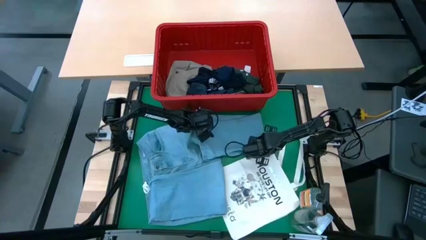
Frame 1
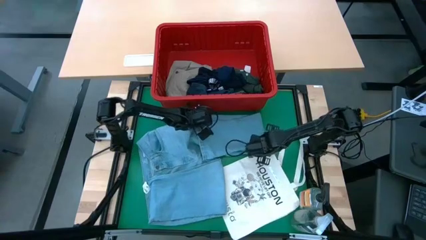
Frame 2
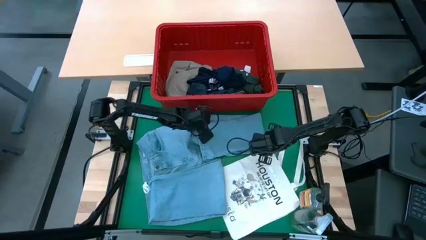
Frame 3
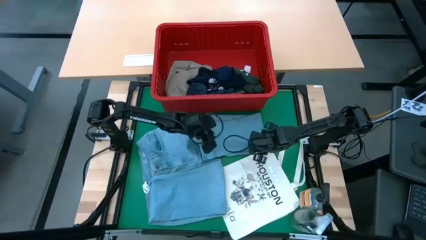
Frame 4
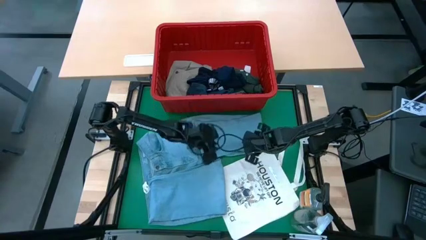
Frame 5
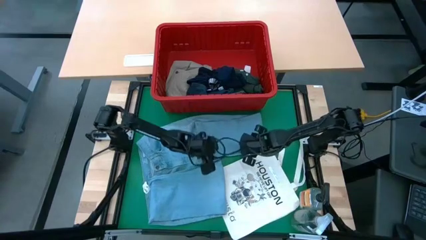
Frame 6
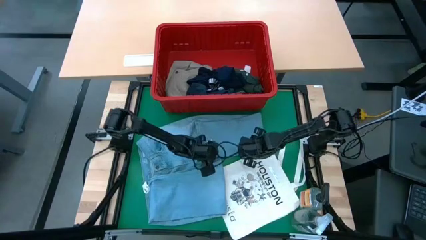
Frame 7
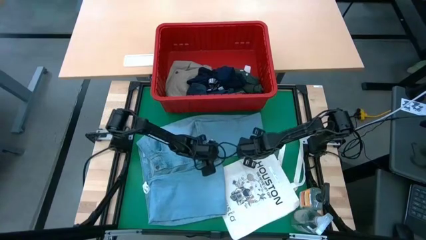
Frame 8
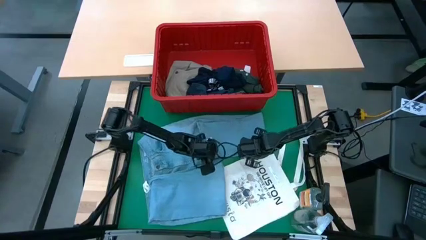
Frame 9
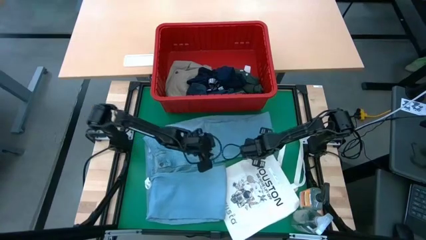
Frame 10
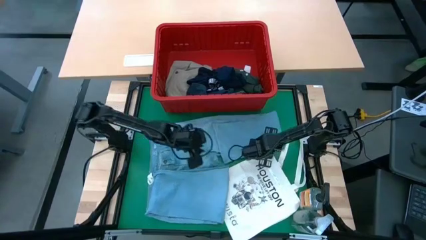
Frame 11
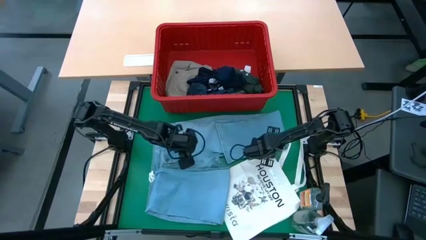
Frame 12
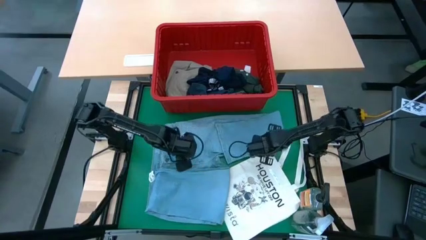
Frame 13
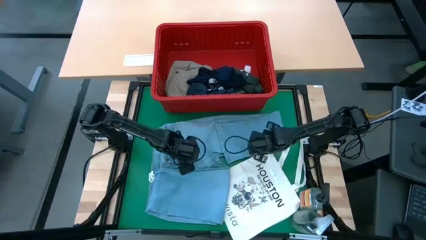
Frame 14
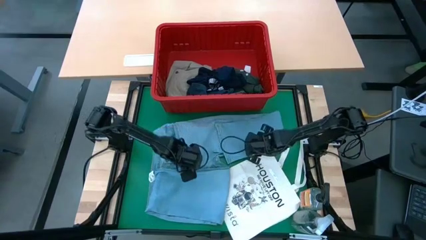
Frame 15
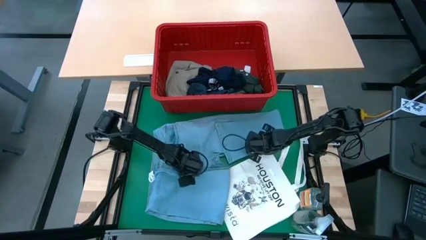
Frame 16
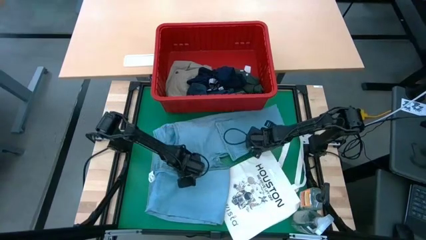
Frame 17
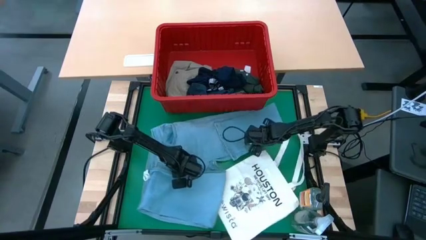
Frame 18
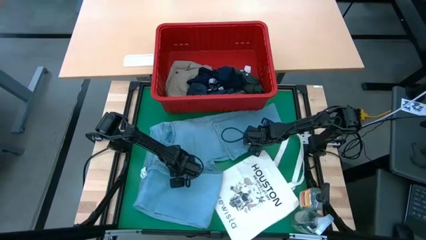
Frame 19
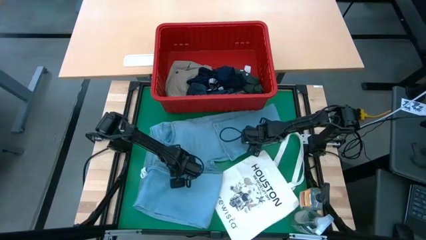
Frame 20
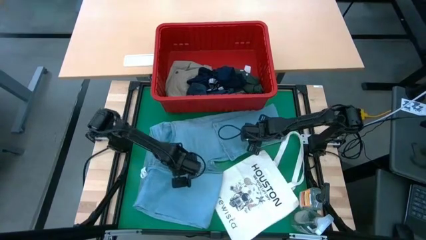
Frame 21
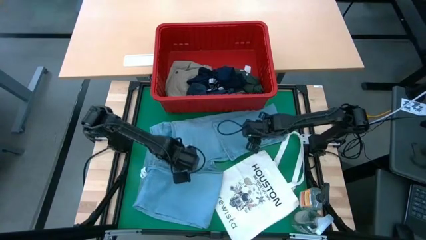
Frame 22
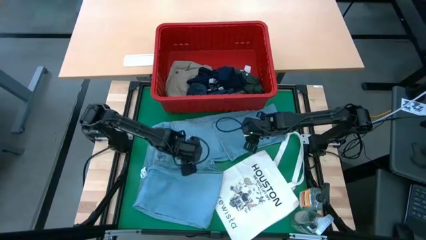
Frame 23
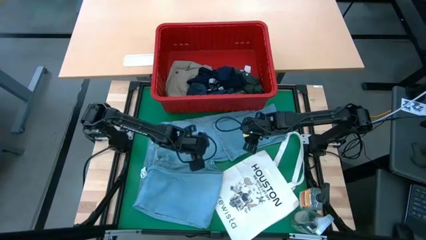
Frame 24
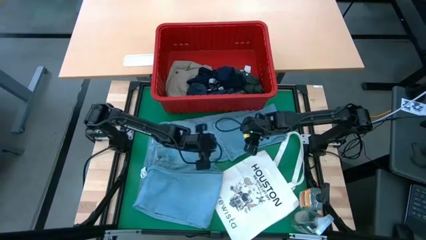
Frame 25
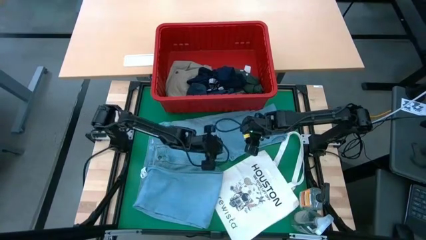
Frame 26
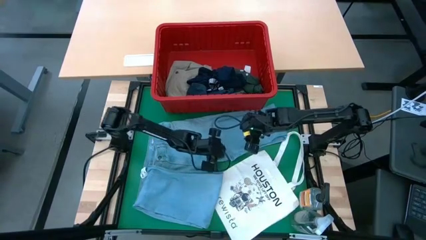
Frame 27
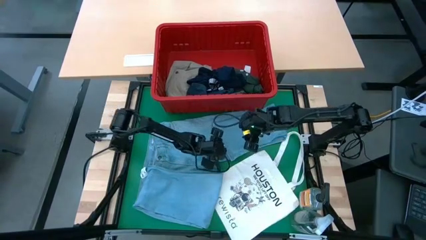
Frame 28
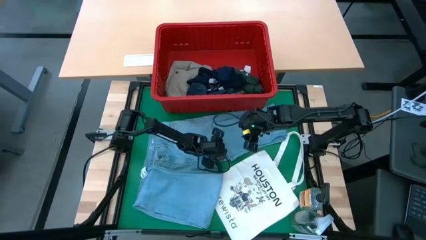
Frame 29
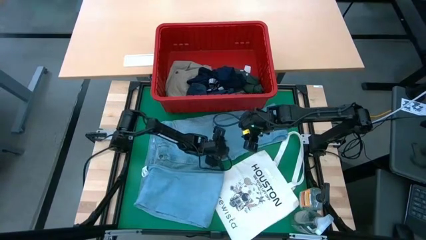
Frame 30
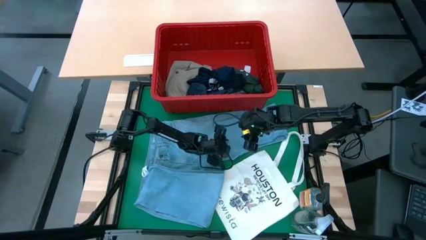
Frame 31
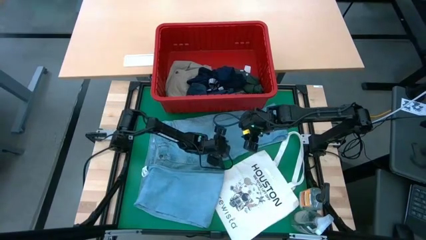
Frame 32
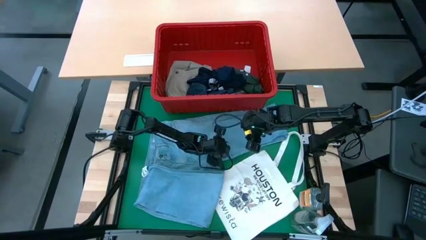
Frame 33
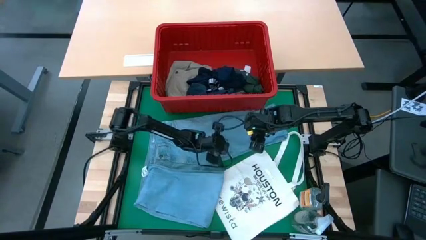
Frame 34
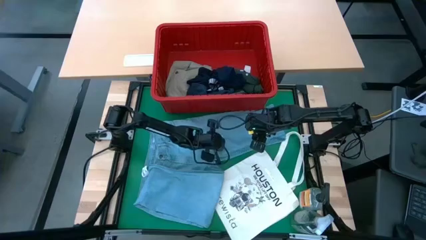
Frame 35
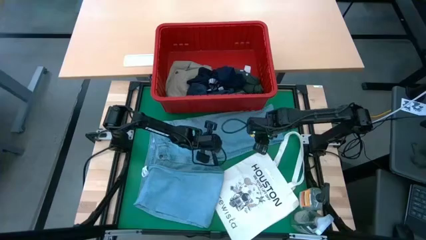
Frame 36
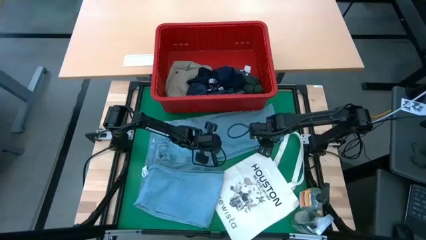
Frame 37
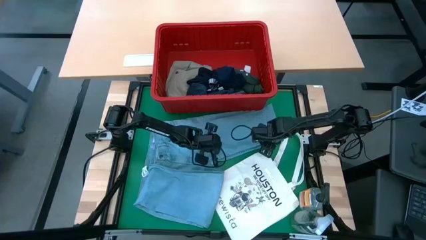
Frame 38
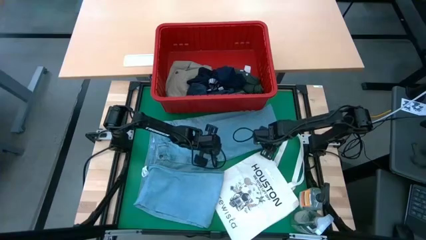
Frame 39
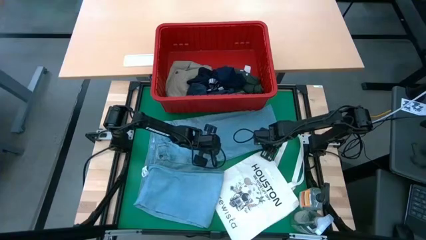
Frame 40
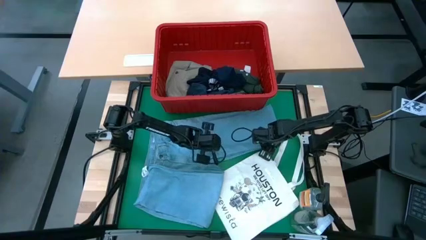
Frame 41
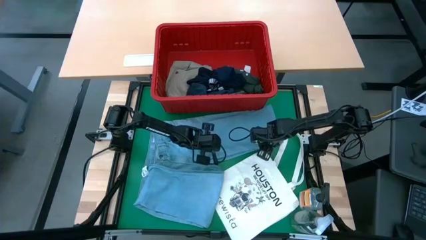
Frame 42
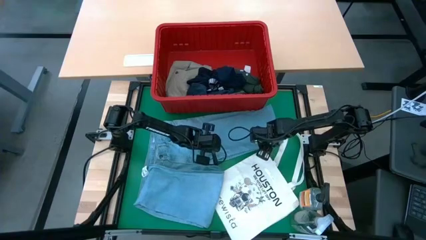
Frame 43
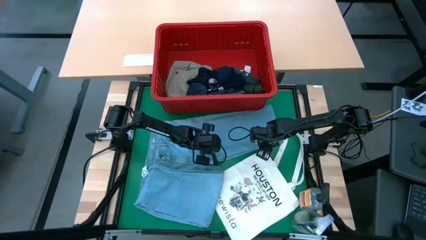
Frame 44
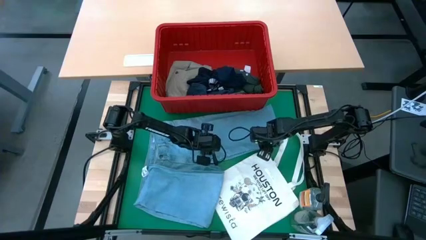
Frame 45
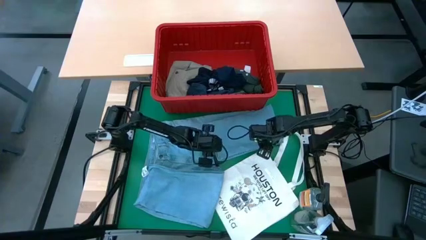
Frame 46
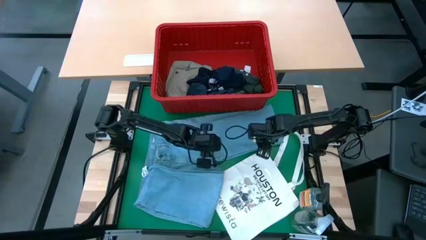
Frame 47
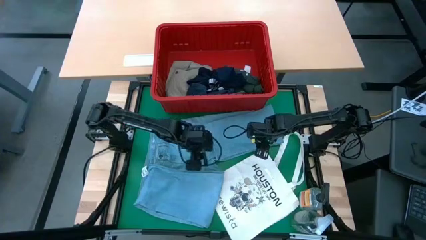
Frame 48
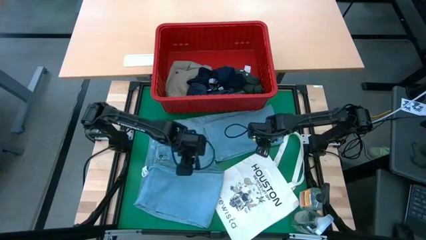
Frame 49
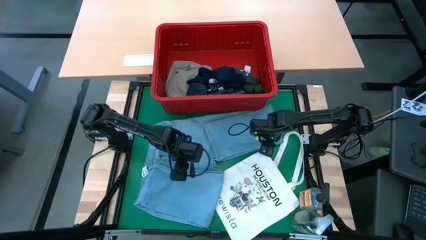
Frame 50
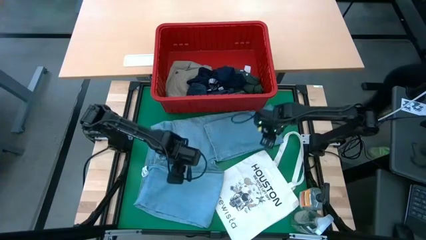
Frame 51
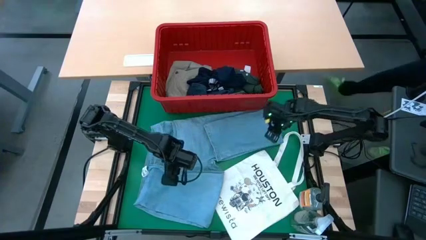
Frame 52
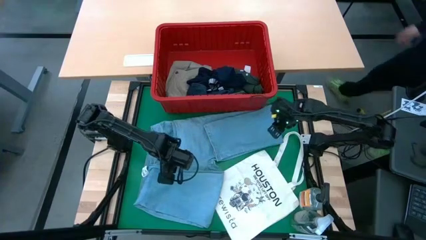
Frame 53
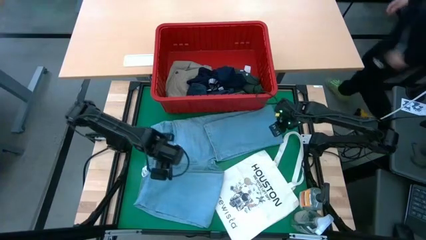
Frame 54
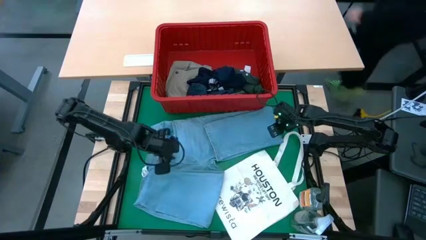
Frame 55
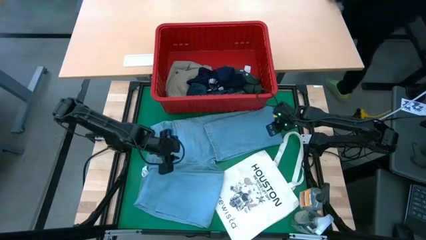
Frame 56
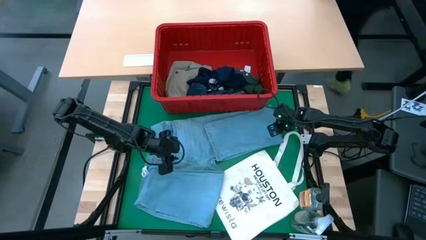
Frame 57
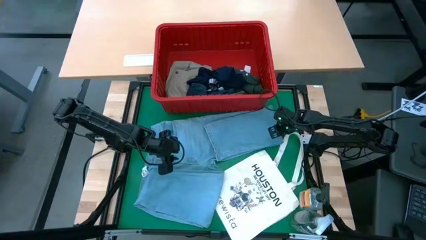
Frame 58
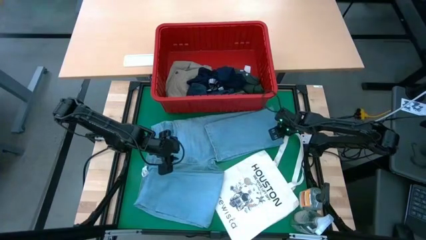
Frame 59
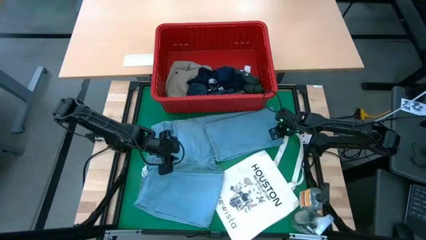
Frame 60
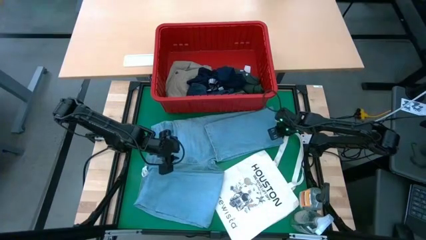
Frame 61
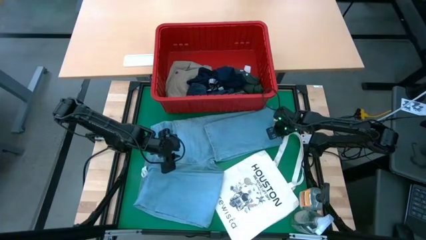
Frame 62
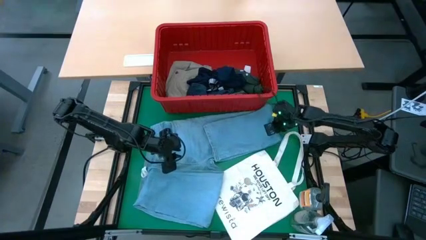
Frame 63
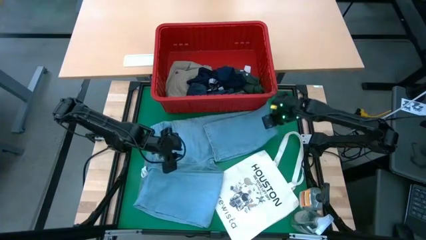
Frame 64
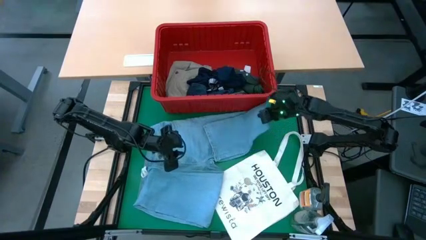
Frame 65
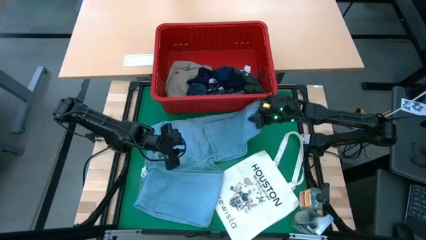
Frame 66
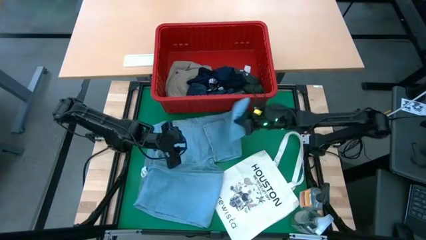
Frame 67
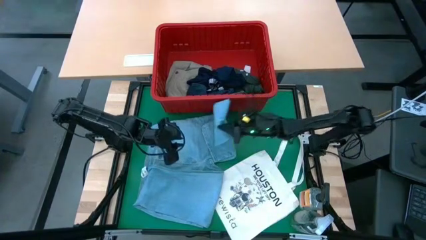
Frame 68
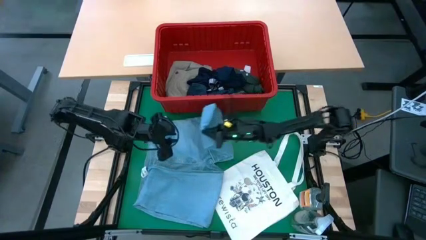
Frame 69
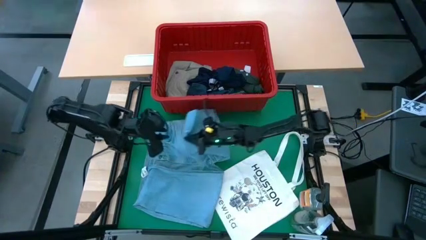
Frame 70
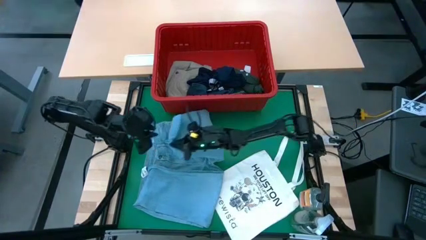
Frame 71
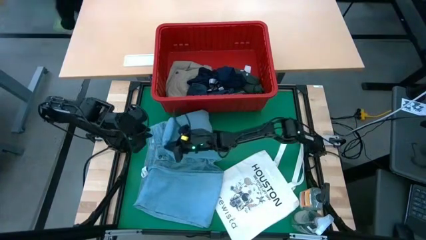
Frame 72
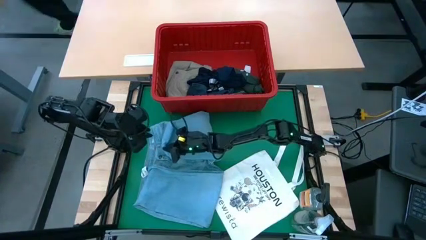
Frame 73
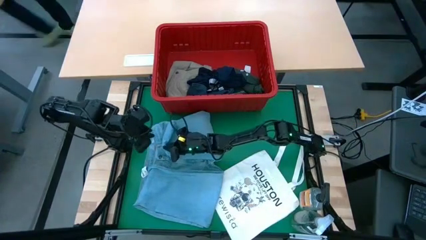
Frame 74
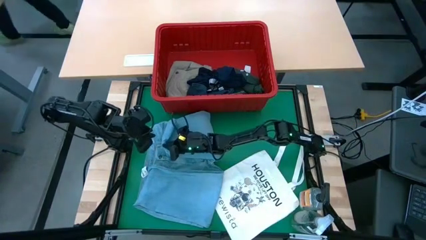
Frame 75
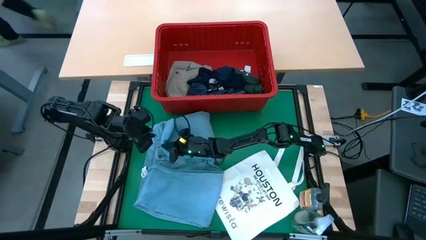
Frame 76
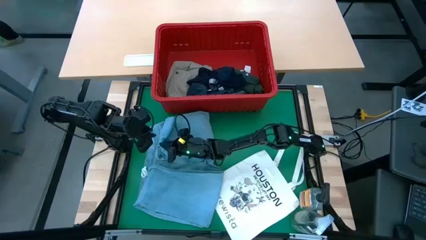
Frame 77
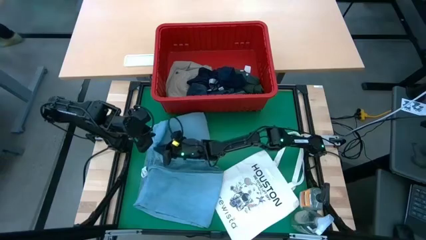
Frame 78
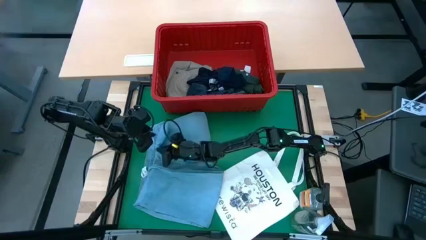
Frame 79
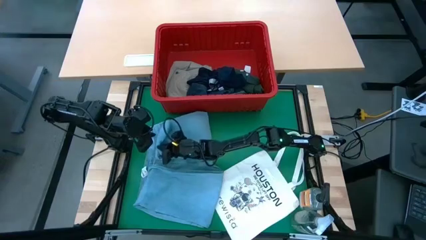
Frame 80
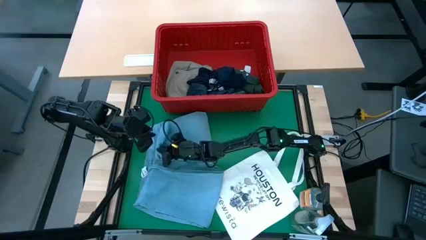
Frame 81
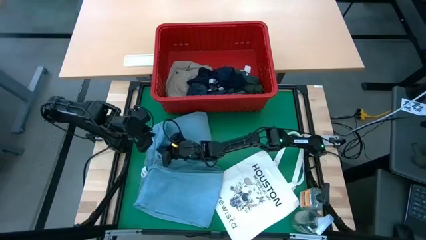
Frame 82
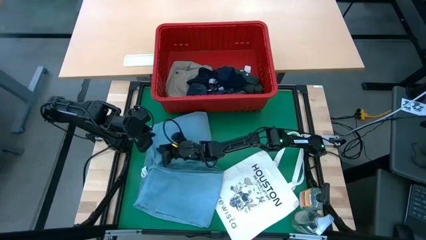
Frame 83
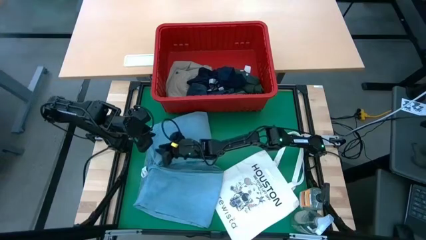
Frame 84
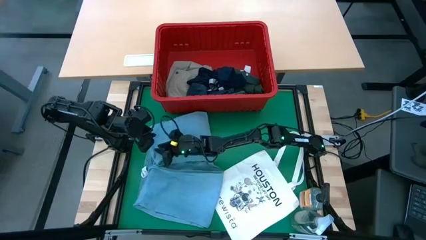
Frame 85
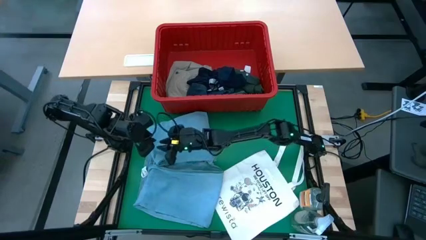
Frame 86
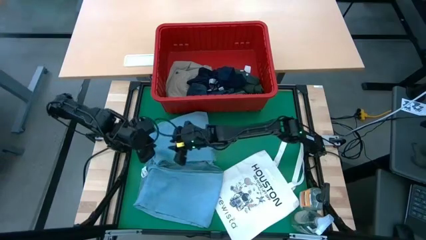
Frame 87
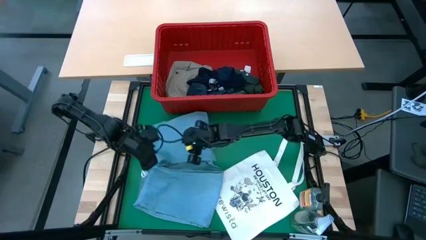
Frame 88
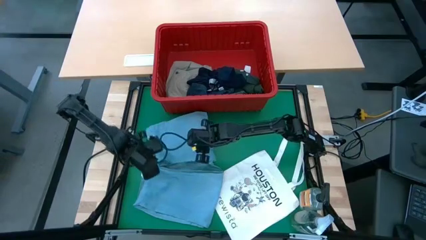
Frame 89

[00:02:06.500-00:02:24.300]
Task: Fold Laundry from Bin
Fold the blue jeans
